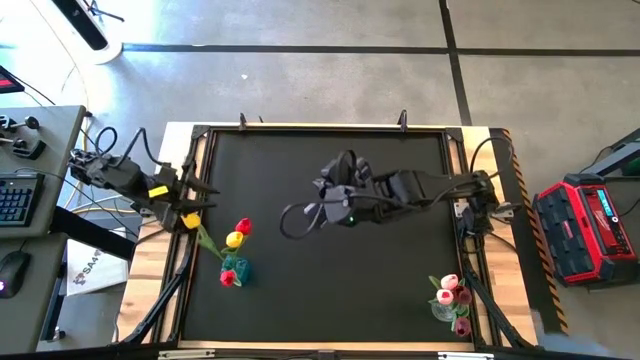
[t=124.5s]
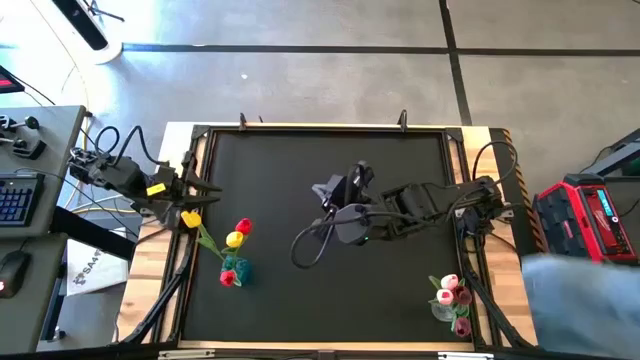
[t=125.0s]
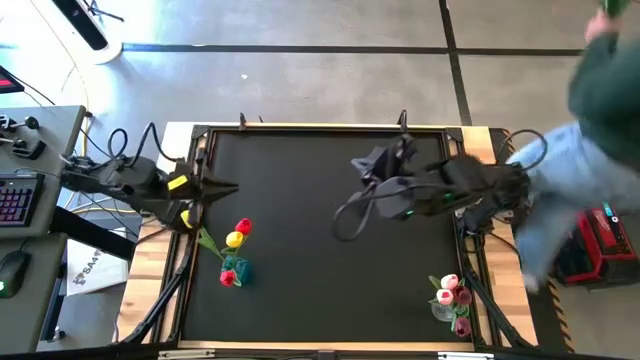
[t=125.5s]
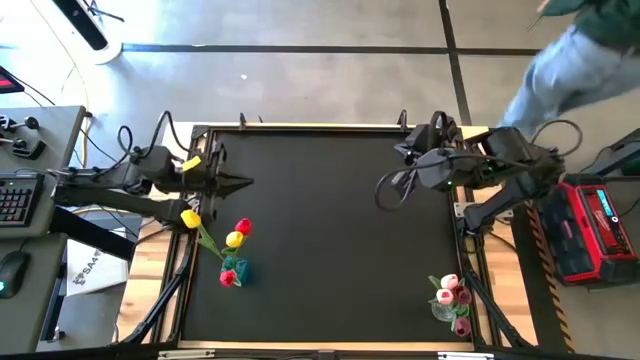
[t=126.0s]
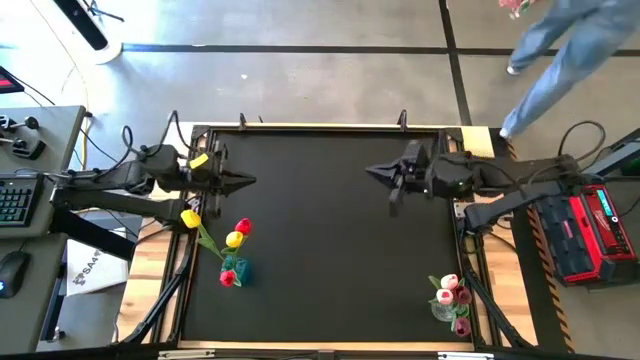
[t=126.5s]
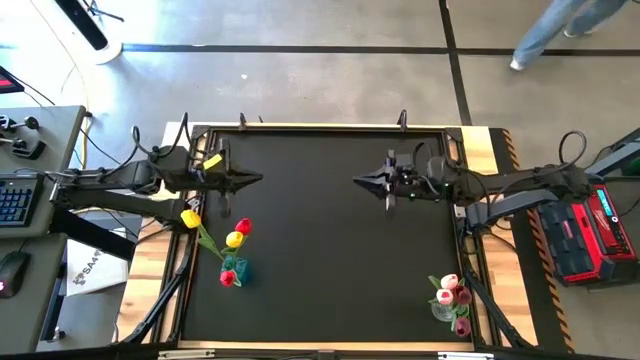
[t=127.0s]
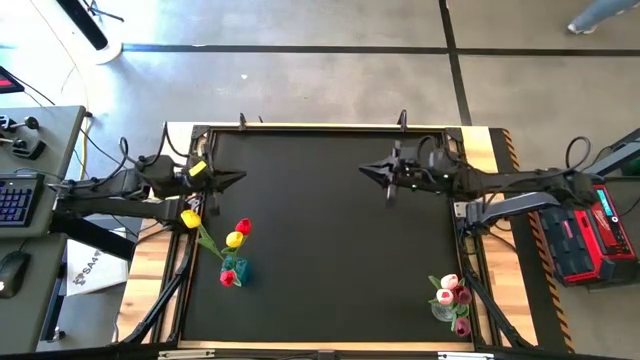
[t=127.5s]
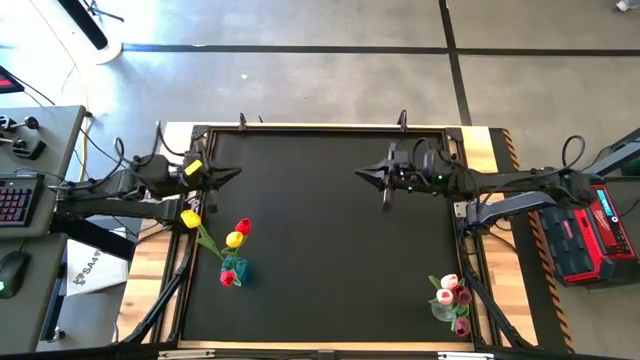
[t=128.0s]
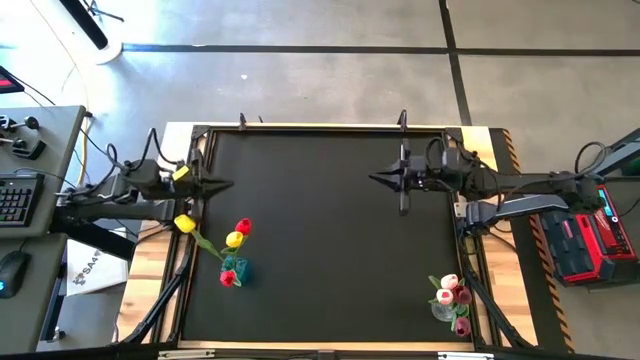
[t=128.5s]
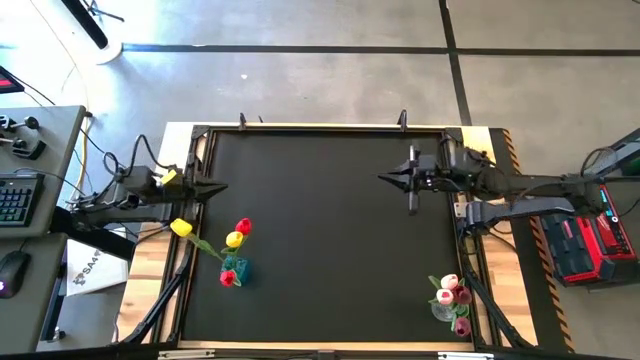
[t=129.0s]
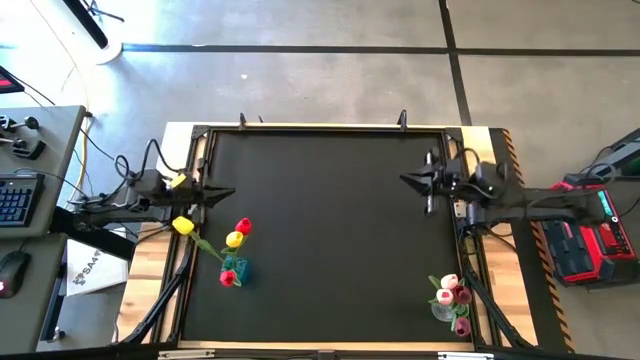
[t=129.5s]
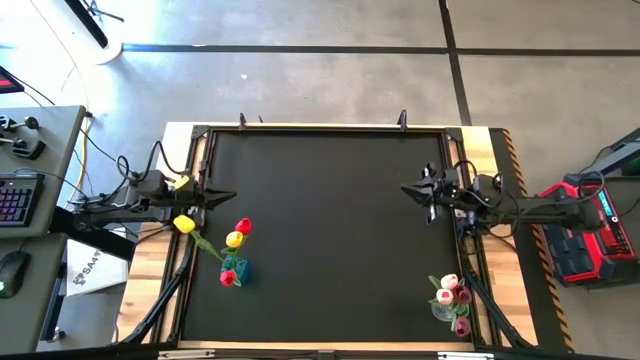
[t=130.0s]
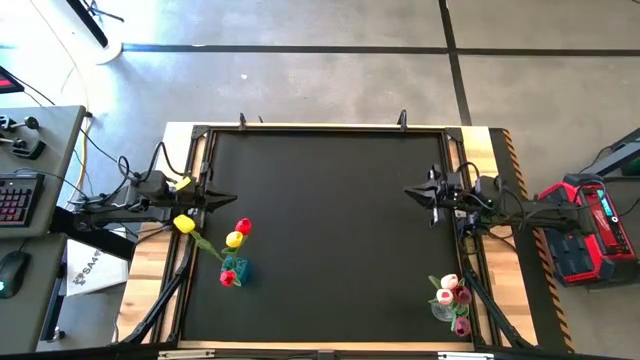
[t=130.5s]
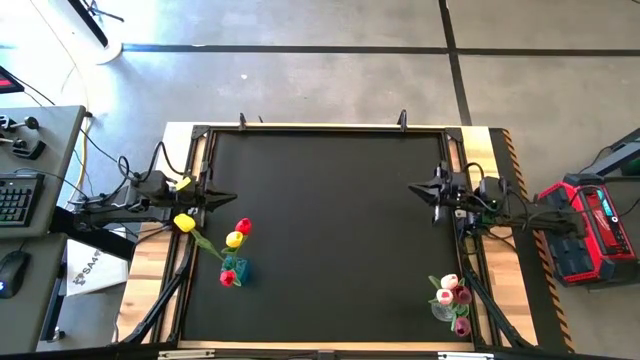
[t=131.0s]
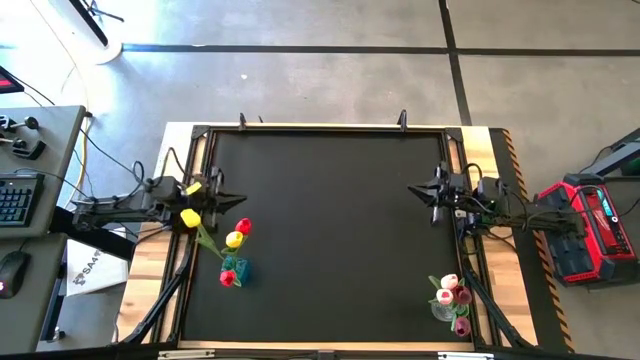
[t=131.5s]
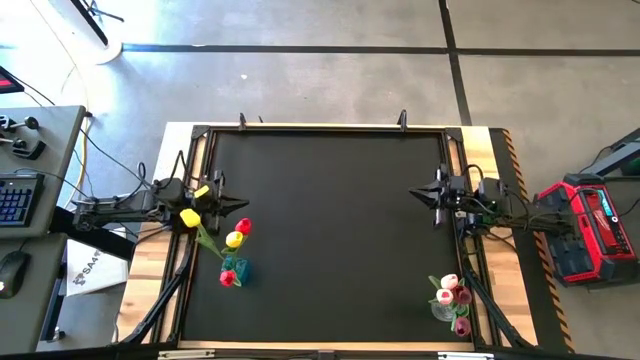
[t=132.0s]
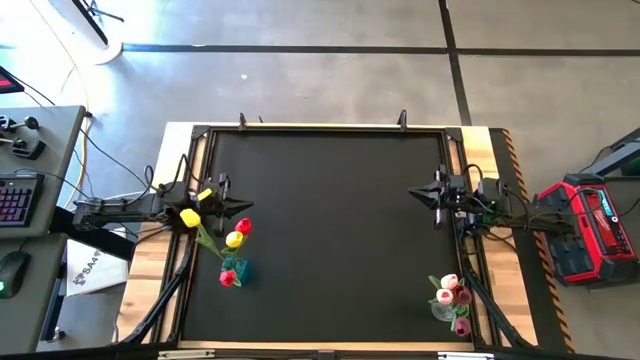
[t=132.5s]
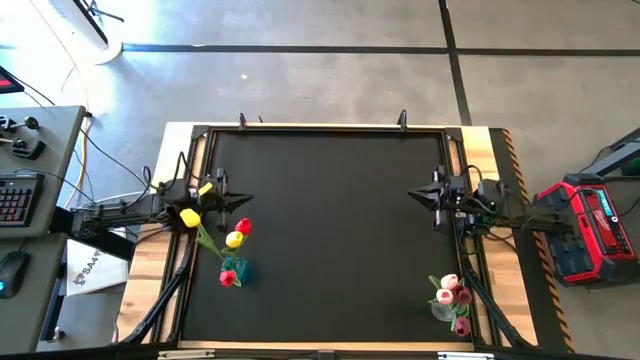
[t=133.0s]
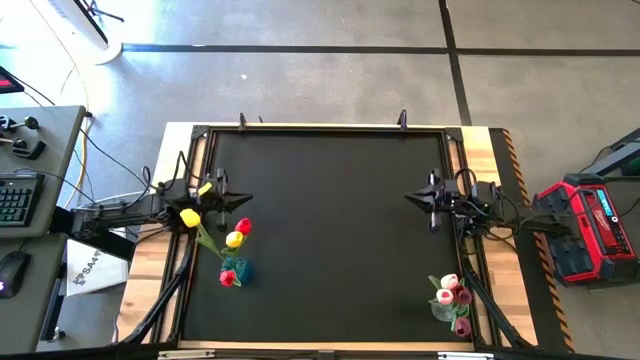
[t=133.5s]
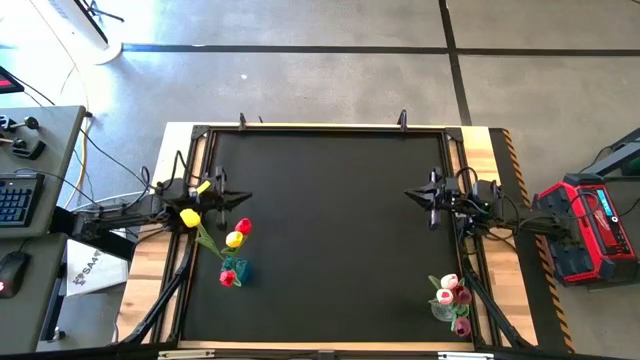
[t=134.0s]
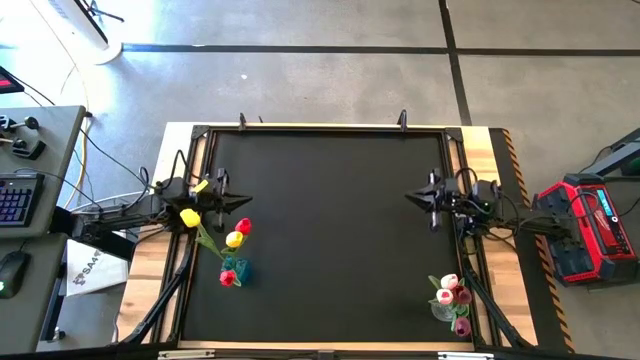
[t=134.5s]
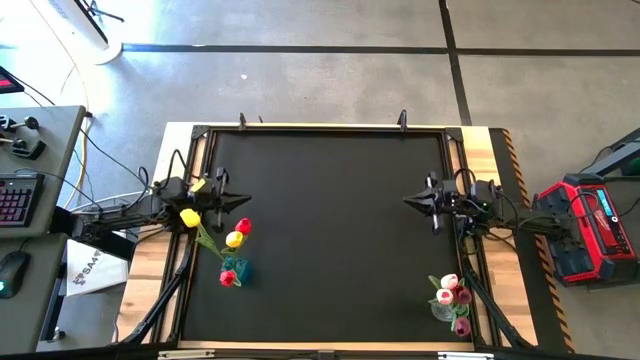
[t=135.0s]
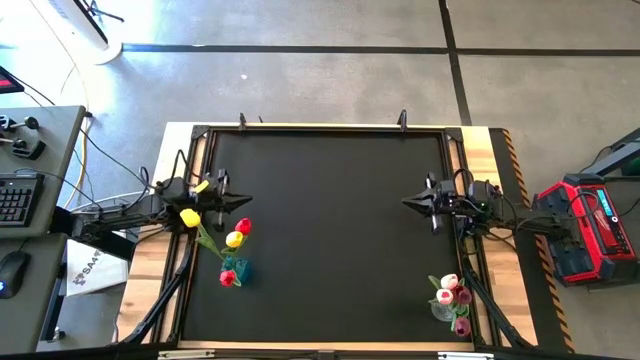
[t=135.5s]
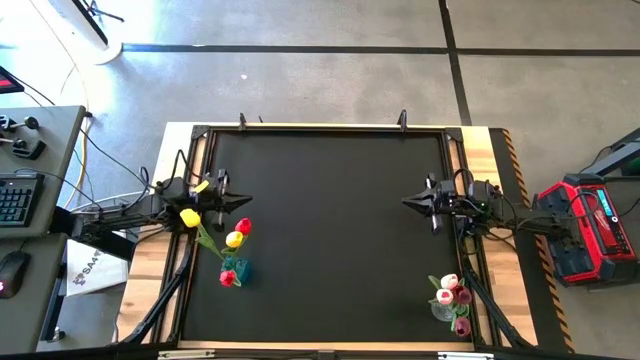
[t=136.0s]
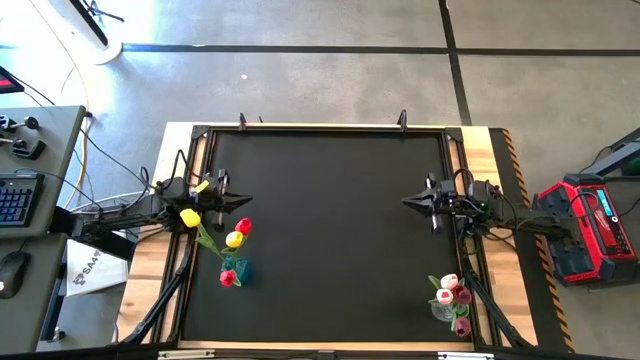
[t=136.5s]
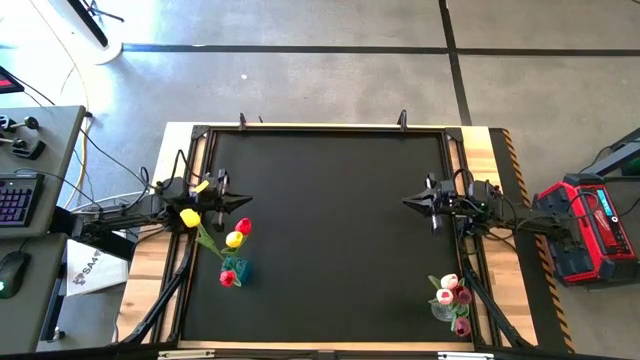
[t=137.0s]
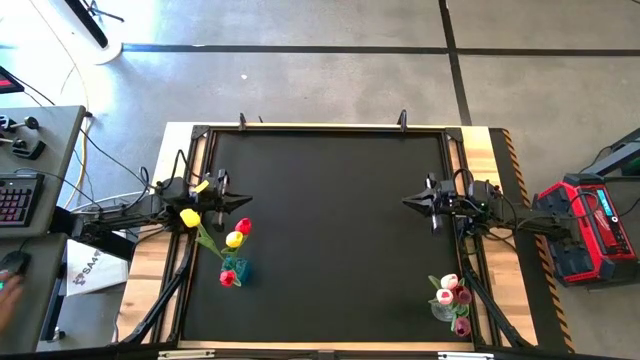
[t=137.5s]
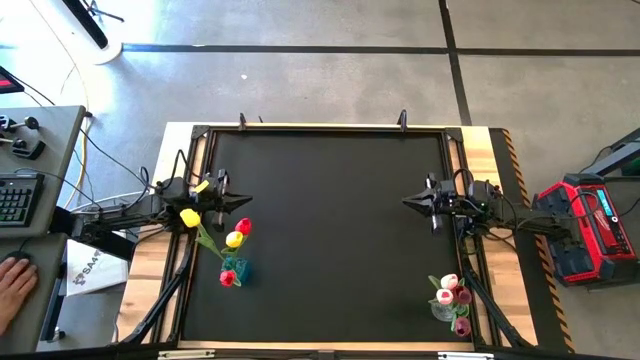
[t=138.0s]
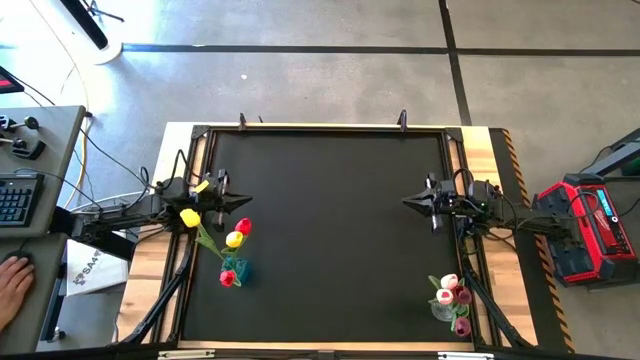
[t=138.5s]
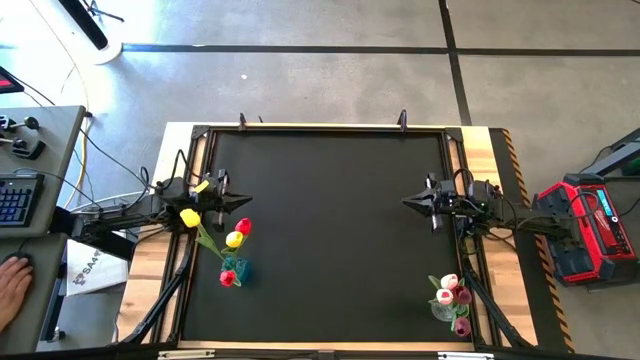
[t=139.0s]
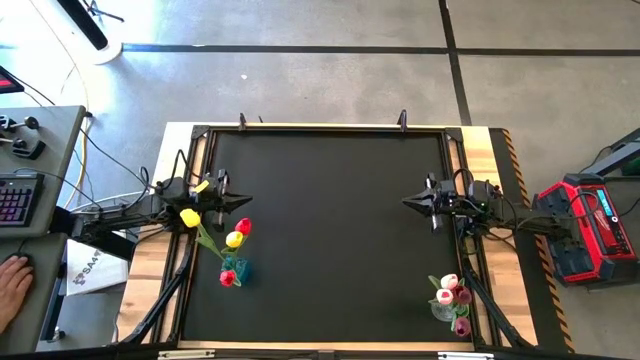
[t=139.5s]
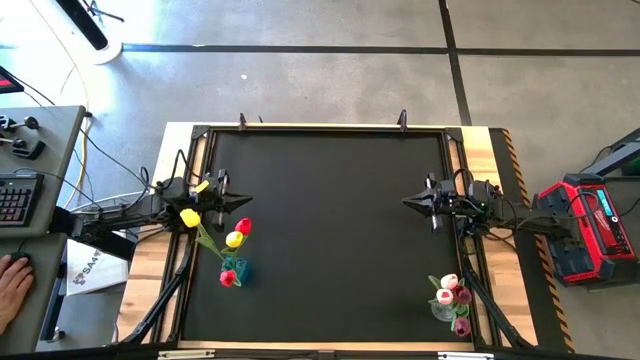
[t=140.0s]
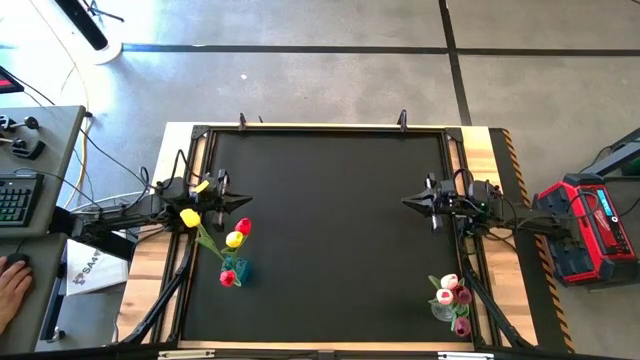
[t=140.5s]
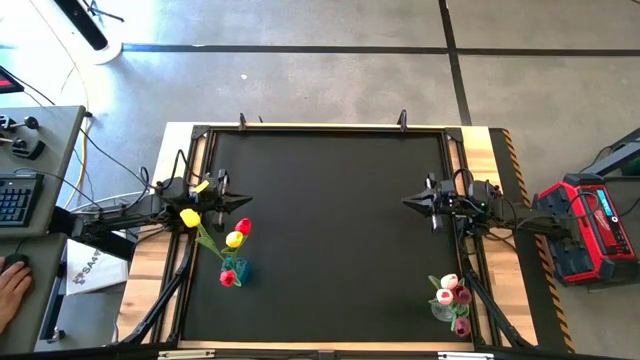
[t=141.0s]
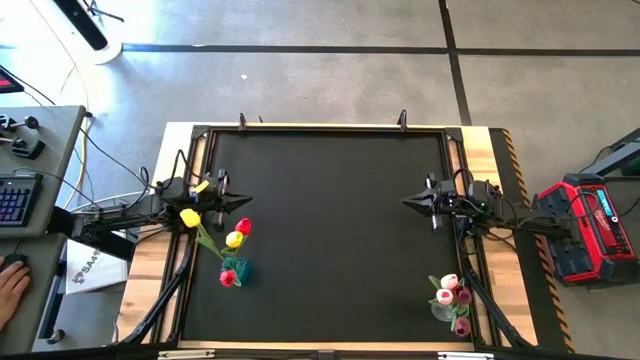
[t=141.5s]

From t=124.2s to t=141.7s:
Task: Sort flowers into vase by color
Return to Home Position

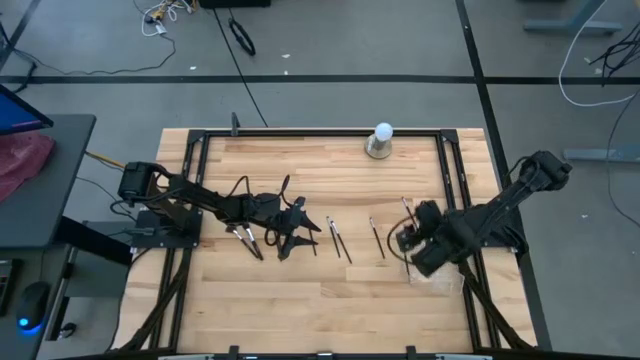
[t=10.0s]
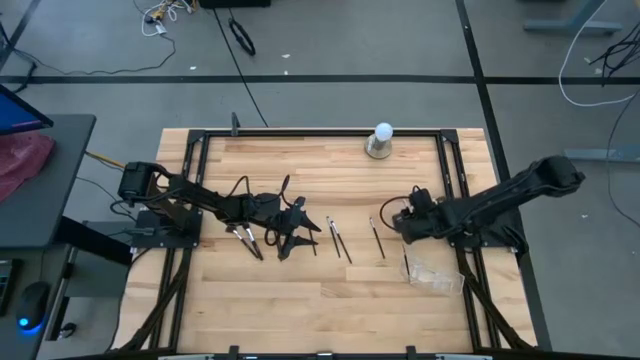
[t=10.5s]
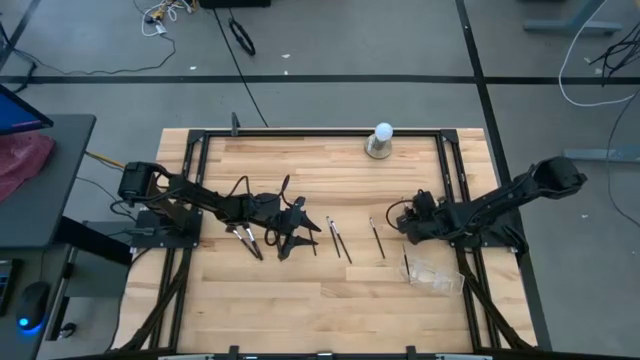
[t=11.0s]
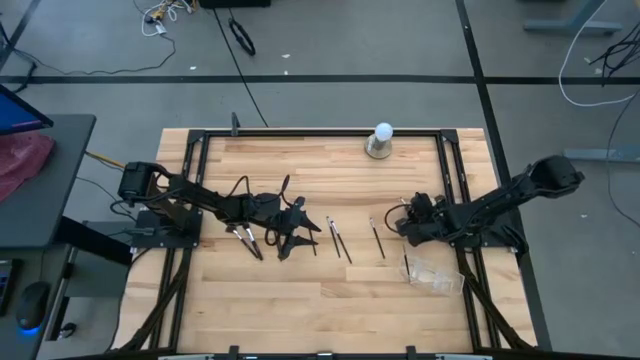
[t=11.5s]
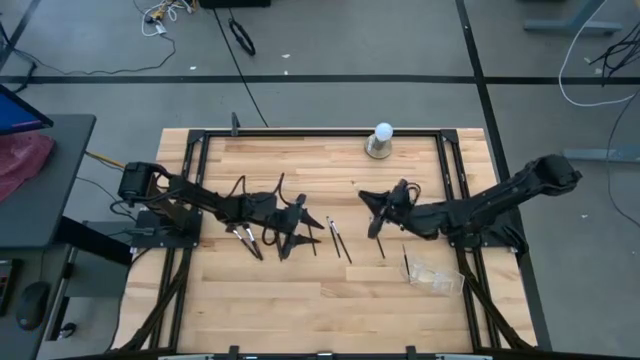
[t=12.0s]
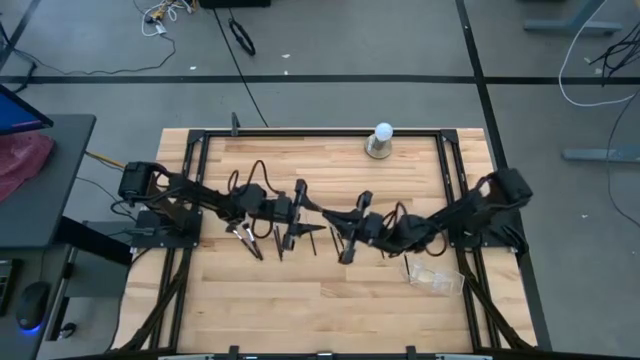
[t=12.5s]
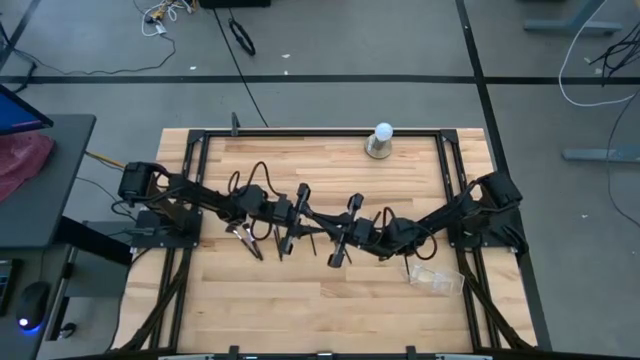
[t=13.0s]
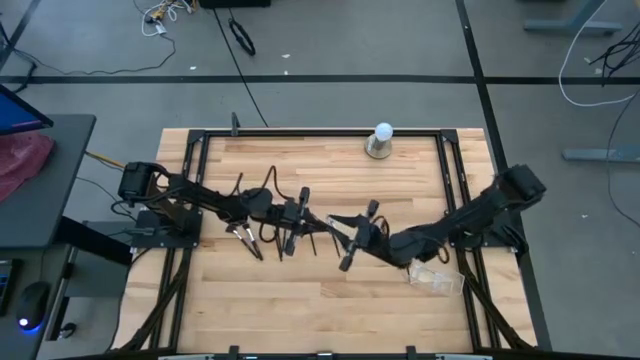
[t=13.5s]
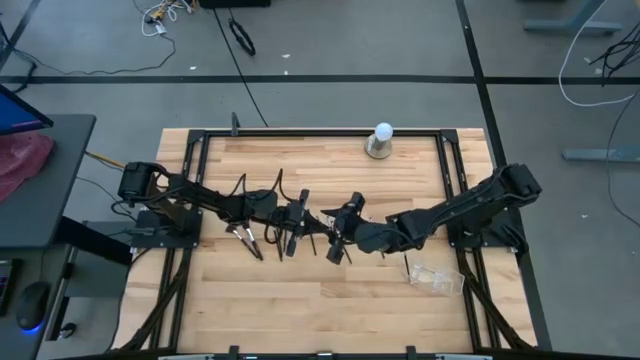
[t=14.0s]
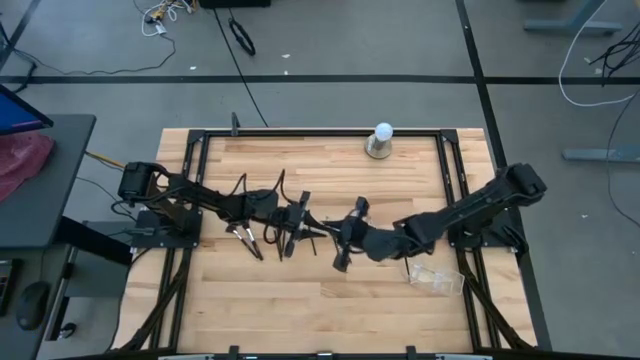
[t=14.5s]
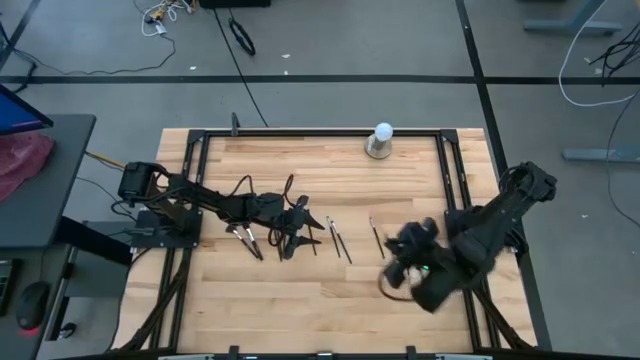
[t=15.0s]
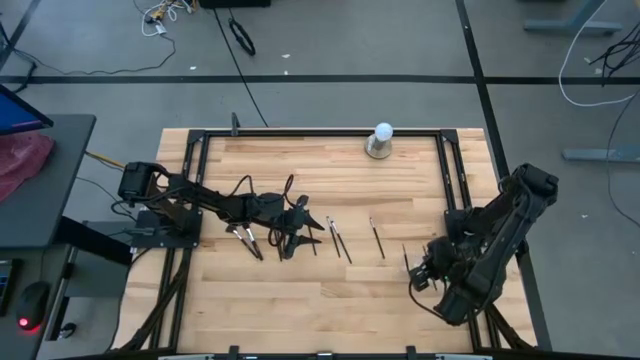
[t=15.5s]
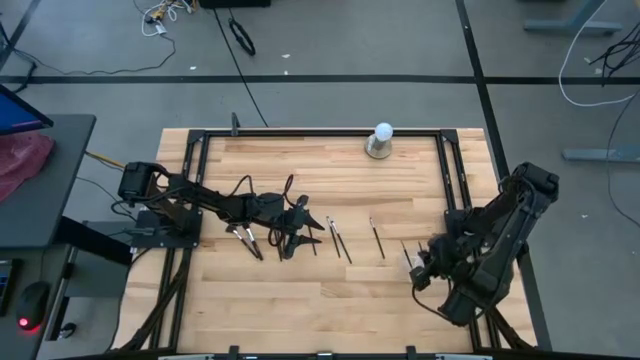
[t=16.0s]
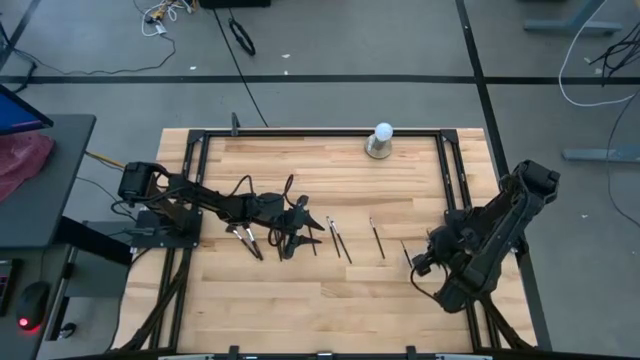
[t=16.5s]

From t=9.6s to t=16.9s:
Task: Put items in baskets/containers
Put the black eyeshadow brush into the transparent organizer
